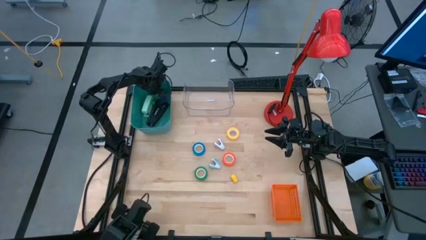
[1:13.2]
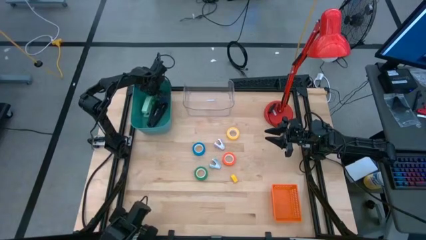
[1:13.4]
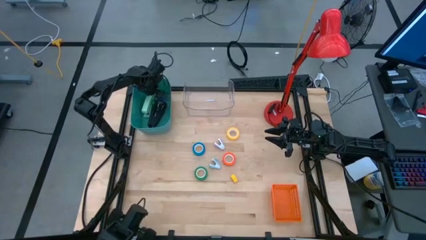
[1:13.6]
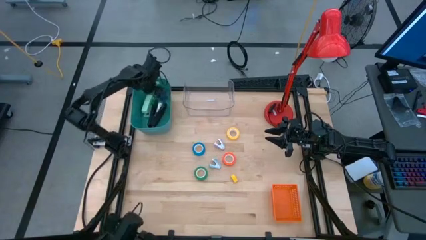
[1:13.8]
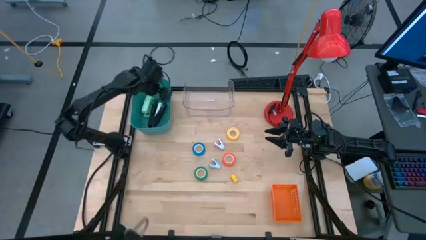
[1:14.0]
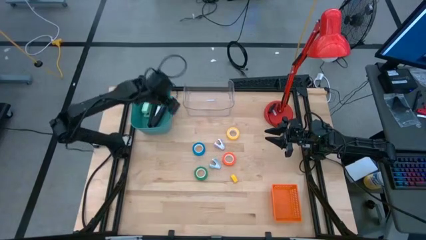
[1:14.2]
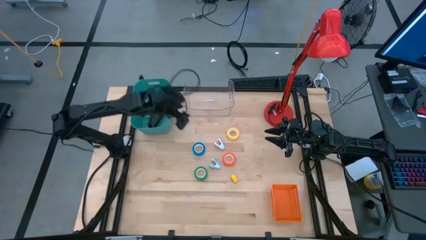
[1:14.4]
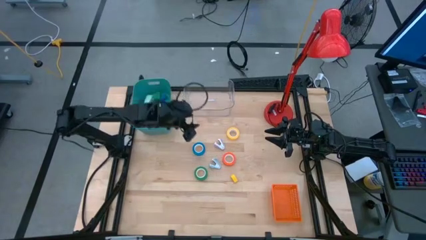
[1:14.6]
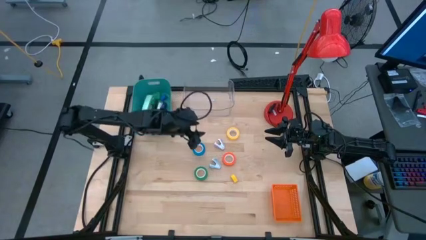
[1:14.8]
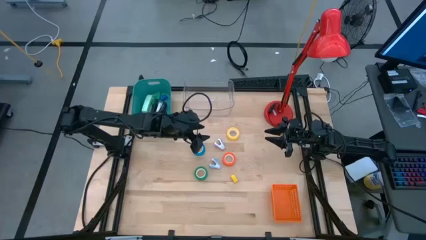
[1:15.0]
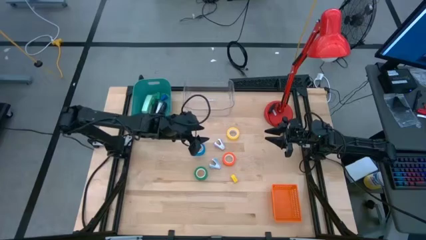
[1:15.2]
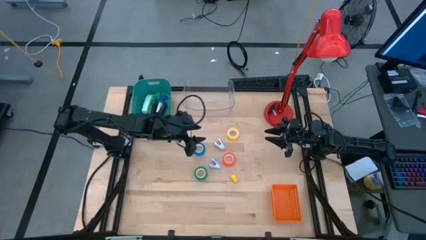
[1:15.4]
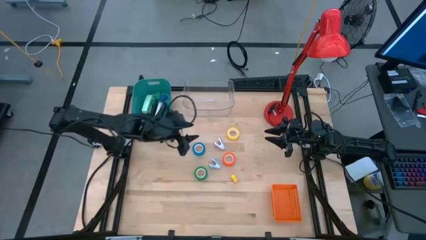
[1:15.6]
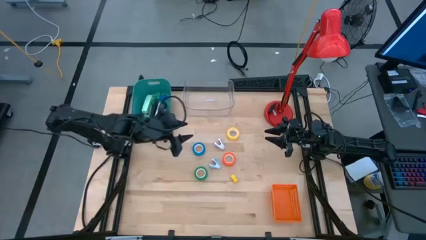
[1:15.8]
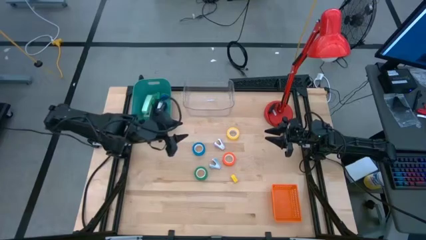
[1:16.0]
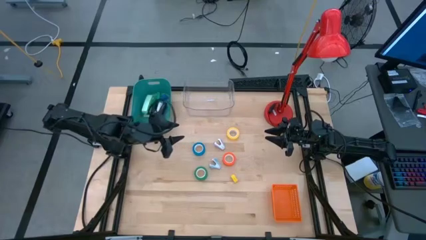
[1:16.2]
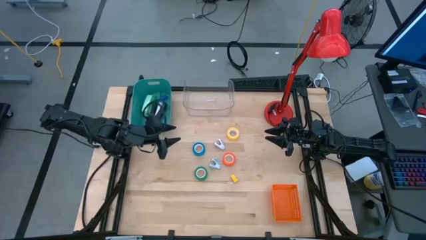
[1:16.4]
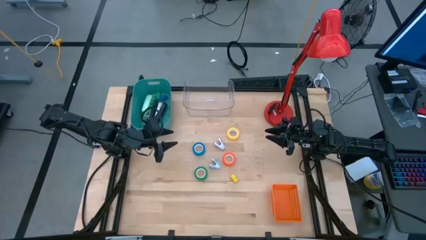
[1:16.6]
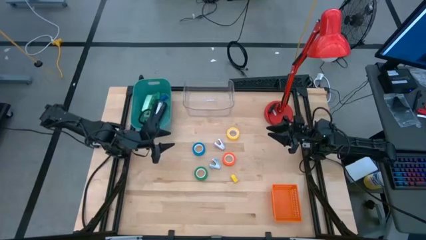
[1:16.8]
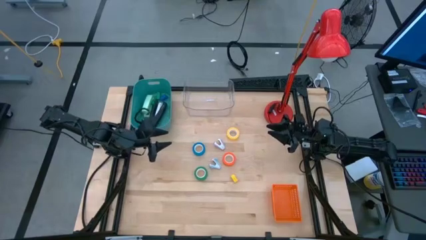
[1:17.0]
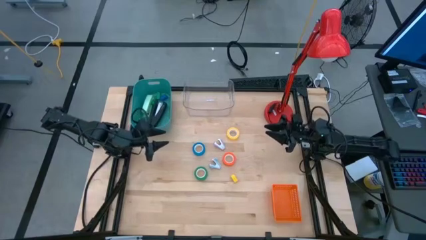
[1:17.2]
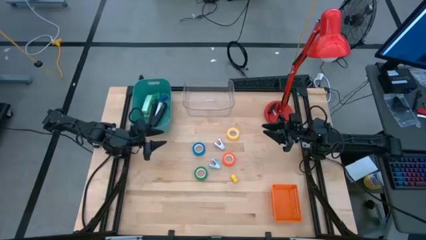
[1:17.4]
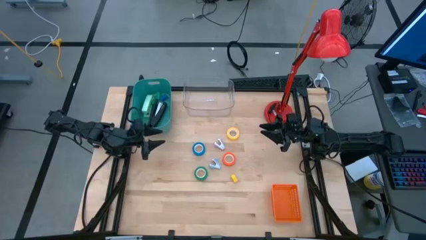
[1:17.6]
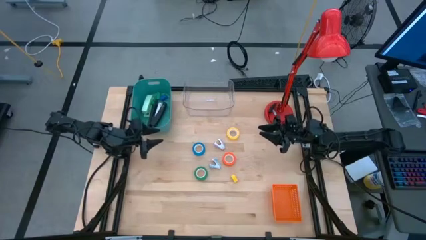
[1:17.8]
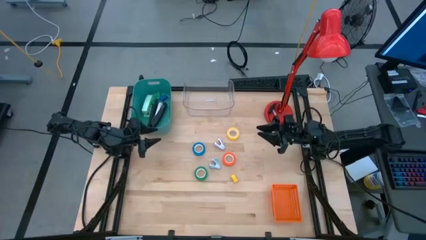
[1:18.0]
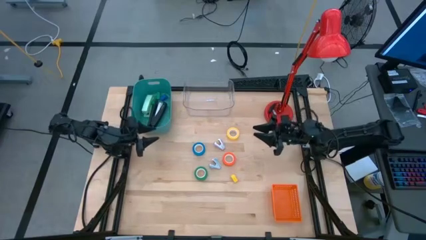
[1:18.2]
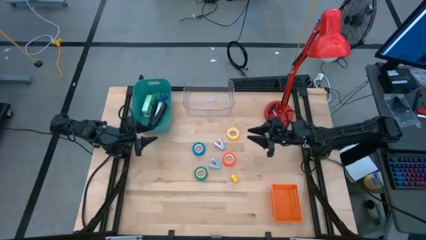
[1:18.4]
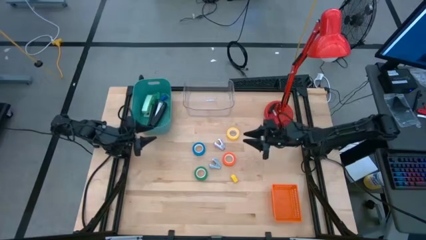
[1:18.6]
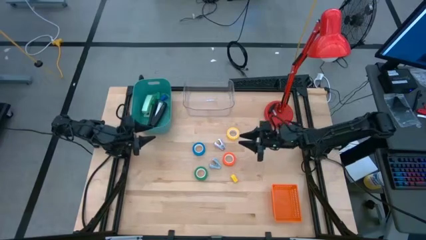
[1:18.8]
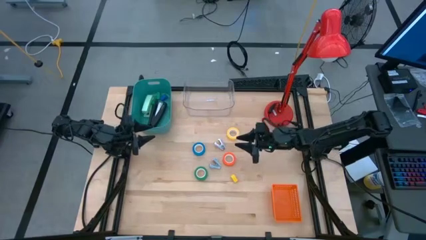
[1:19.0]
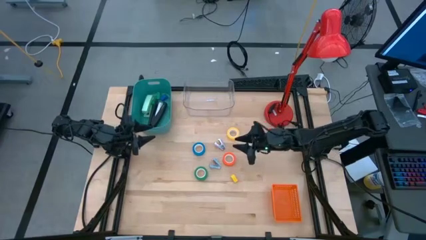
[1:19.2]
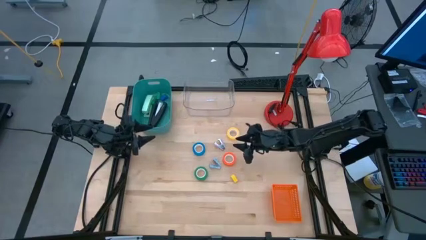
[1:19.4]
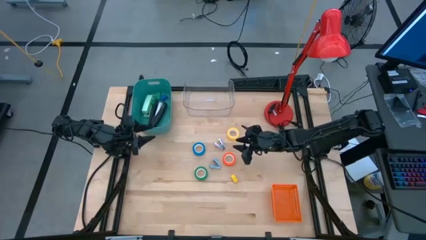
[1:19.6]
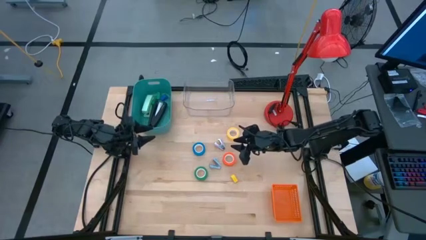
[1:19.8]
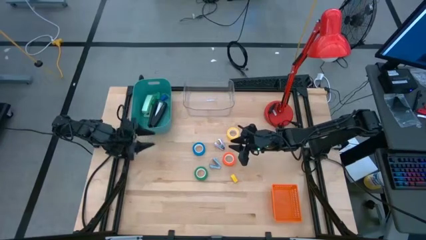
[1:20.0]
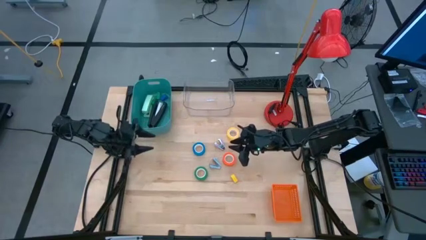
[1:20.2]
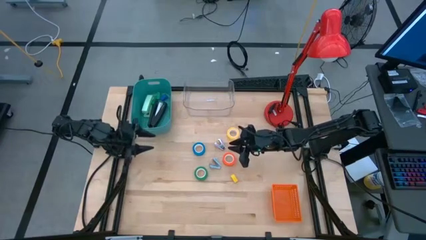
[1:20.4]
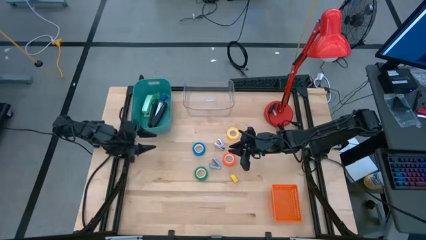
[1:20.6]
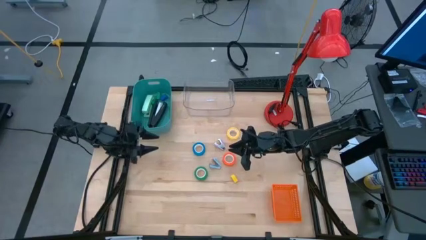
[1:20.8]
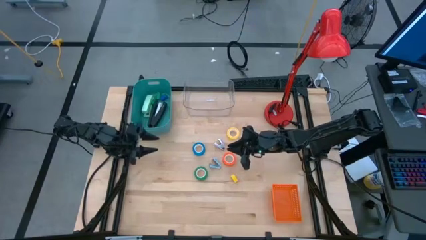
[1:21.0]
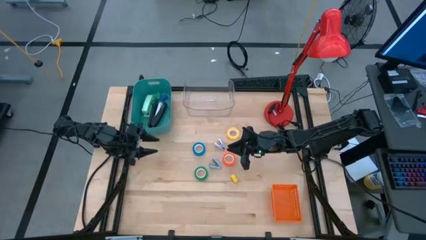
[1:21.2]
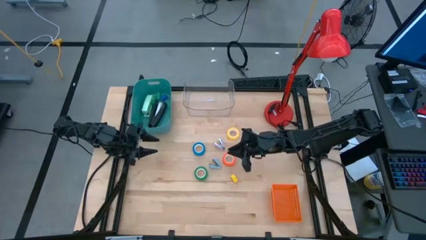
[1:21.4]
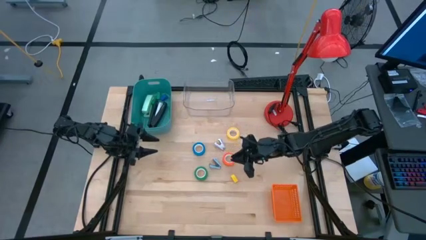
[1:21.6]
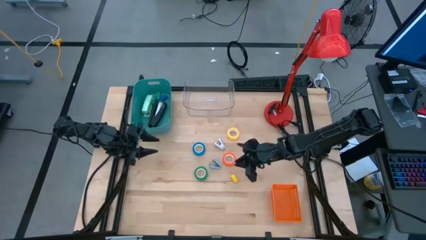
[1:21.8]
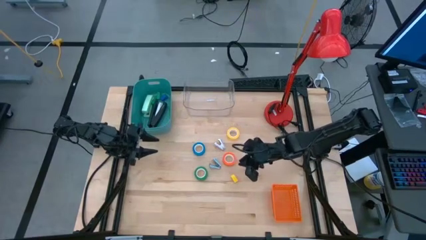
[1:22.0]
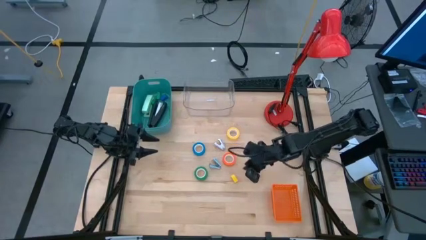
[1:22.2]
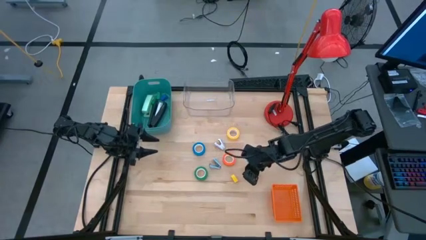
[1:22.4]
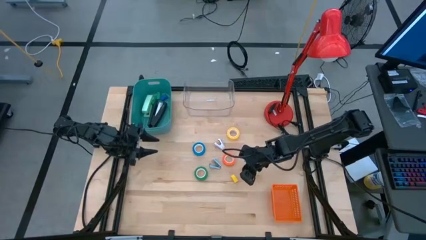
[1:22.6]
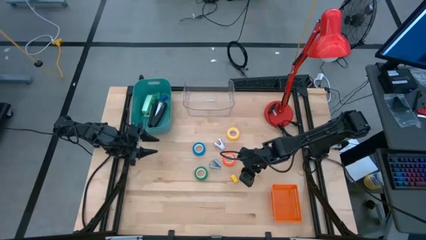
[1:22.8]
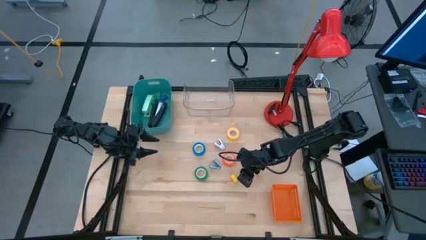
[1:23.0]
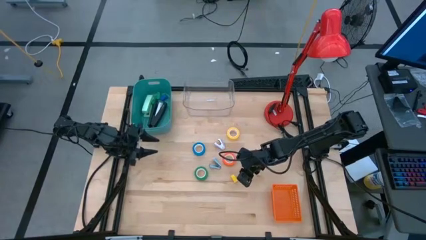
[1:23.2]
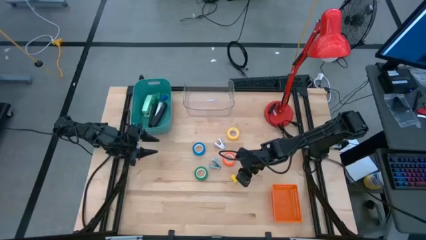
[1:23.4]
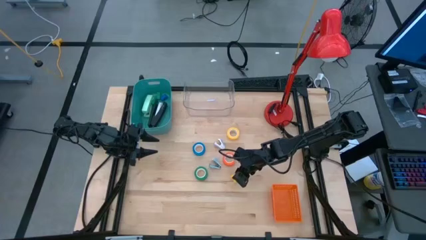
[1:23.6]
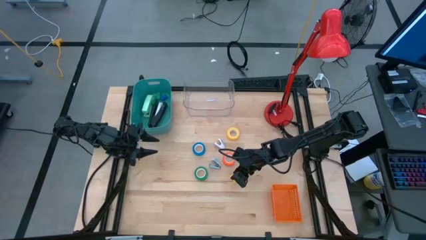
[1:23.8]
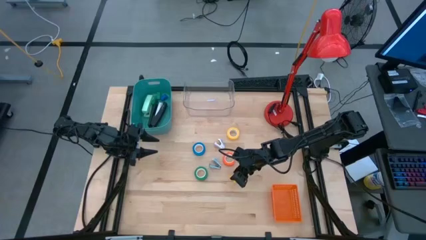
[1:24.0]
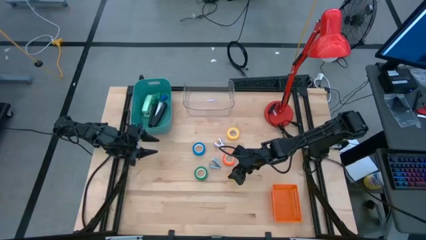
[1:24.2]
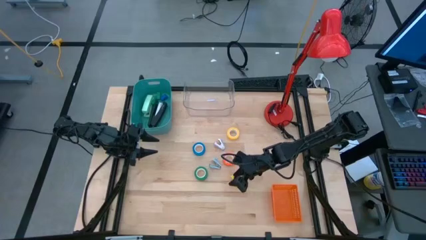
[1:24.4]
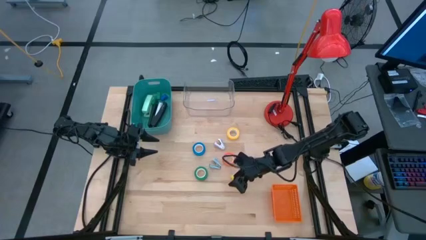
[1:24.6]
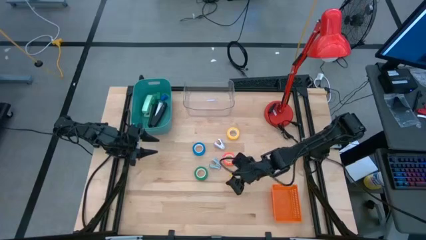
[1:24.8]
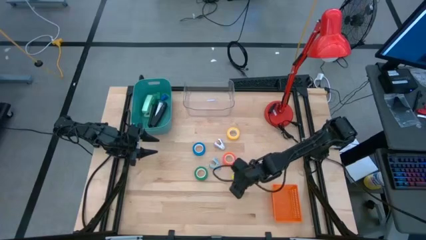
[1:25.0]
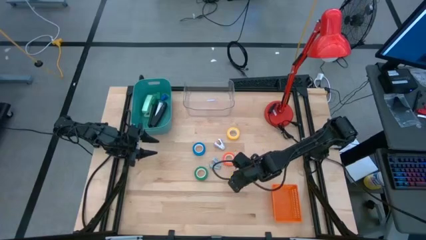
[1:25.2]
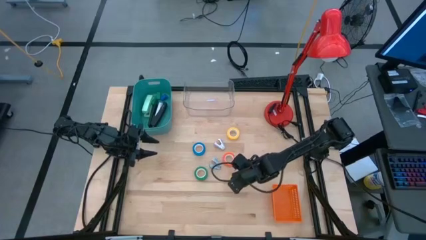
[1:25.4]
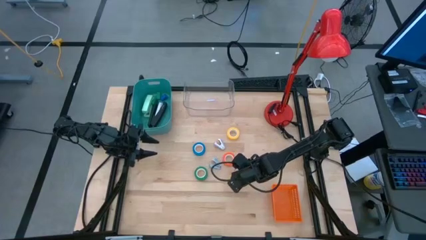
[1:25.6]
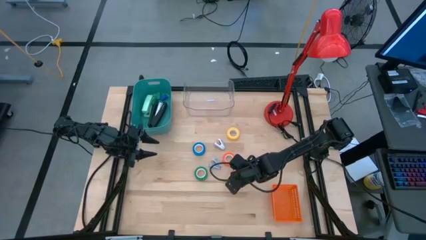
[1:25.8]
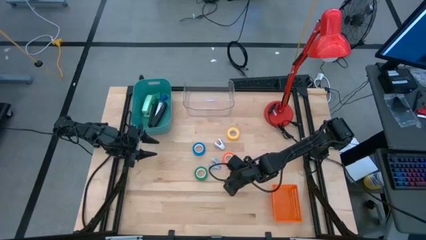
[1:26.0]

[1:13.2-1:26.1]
Task: Pick and place Stapler, Stapler remover, tape
Put the yellow stapler into the green bin
